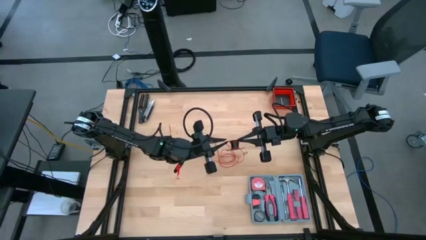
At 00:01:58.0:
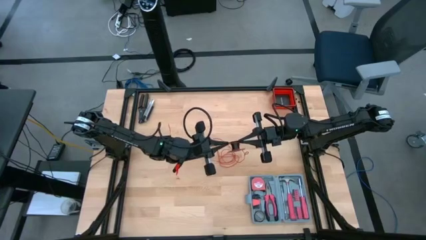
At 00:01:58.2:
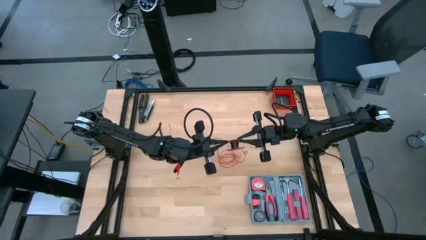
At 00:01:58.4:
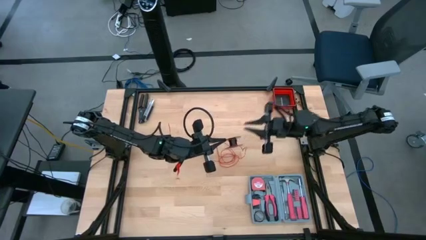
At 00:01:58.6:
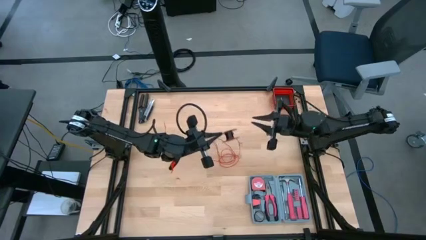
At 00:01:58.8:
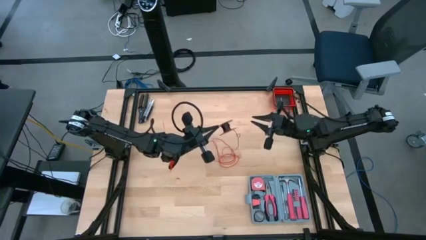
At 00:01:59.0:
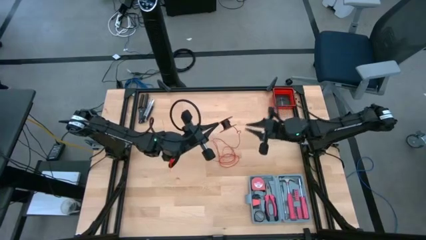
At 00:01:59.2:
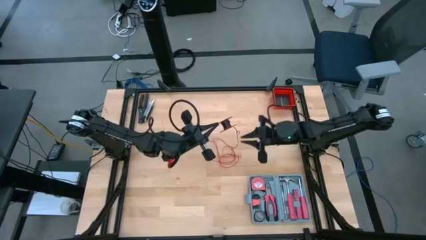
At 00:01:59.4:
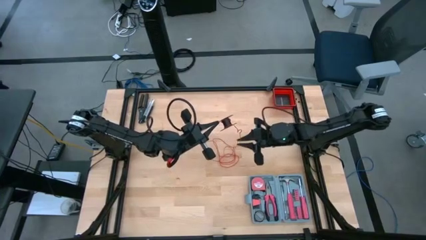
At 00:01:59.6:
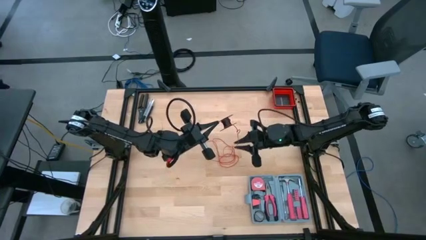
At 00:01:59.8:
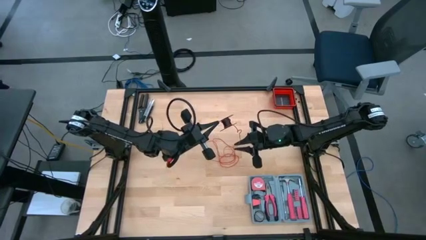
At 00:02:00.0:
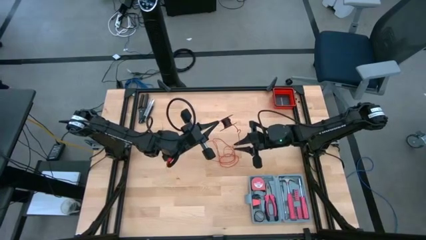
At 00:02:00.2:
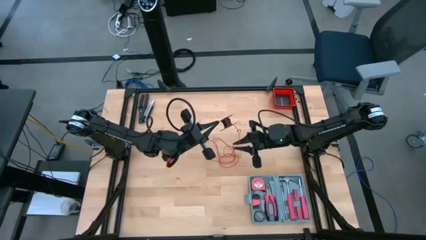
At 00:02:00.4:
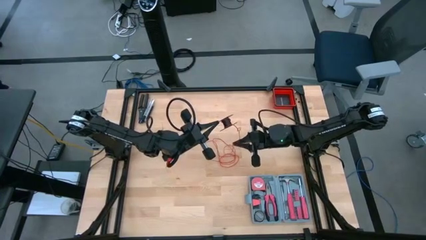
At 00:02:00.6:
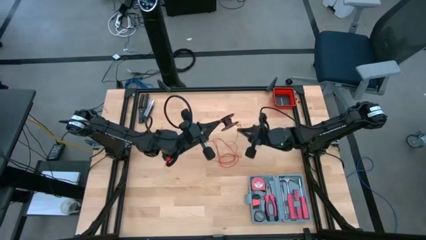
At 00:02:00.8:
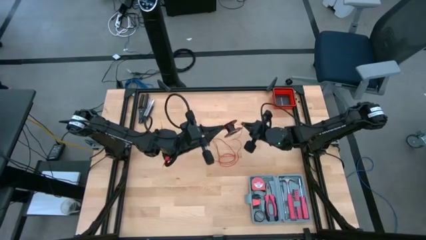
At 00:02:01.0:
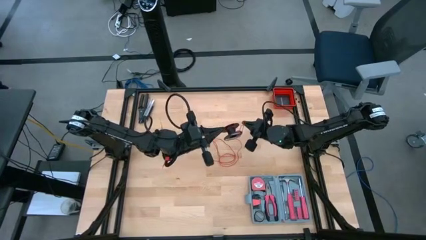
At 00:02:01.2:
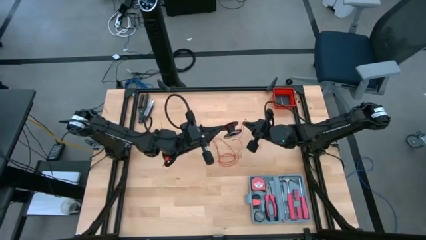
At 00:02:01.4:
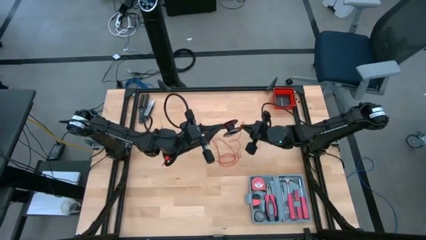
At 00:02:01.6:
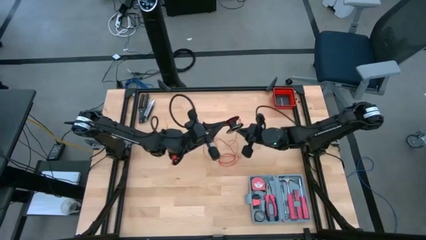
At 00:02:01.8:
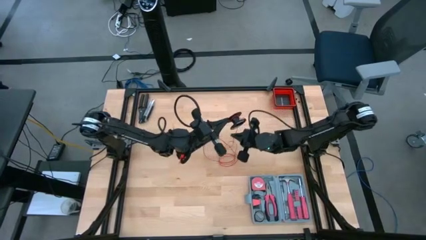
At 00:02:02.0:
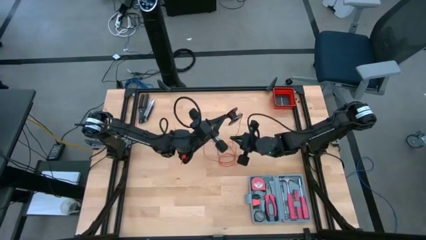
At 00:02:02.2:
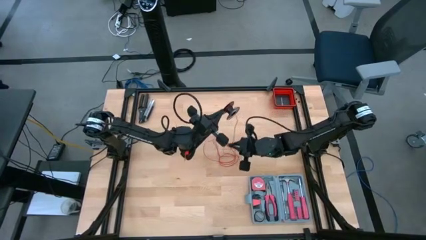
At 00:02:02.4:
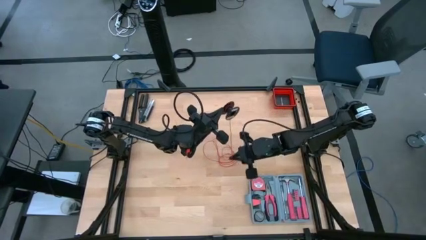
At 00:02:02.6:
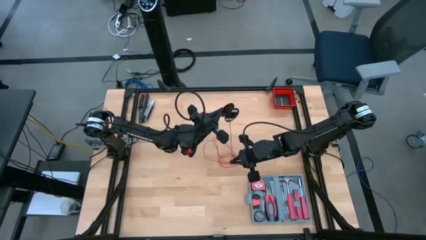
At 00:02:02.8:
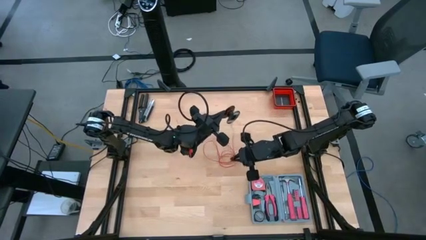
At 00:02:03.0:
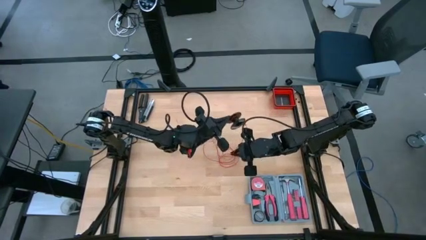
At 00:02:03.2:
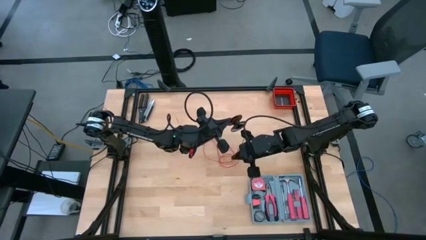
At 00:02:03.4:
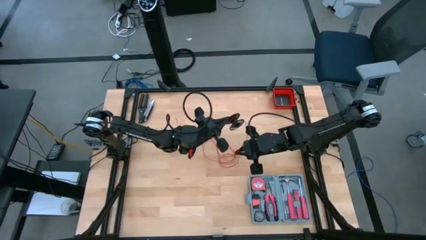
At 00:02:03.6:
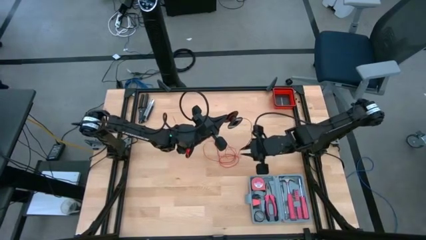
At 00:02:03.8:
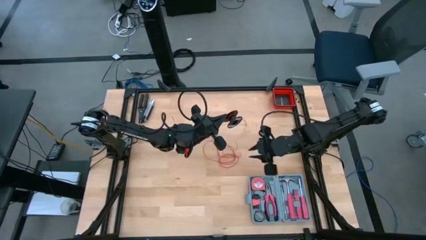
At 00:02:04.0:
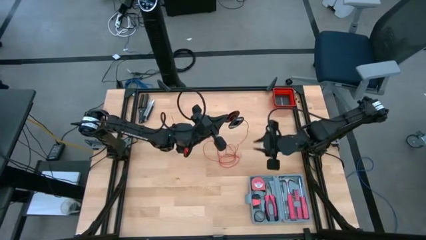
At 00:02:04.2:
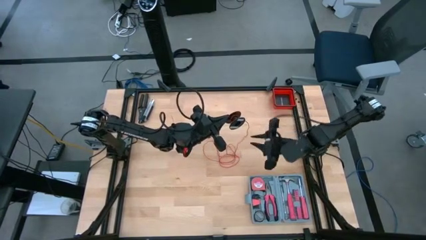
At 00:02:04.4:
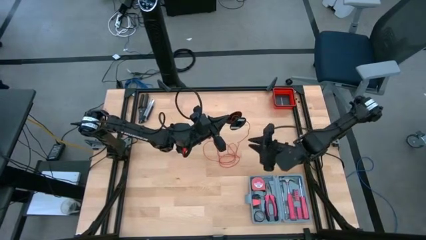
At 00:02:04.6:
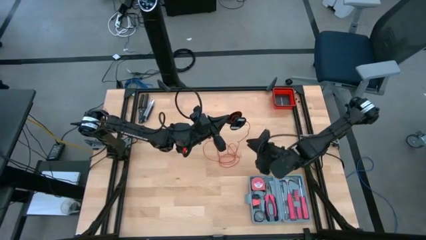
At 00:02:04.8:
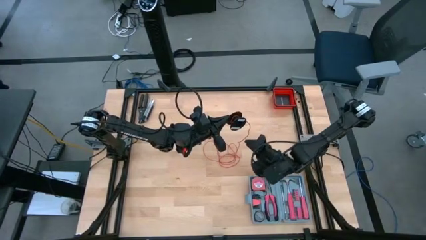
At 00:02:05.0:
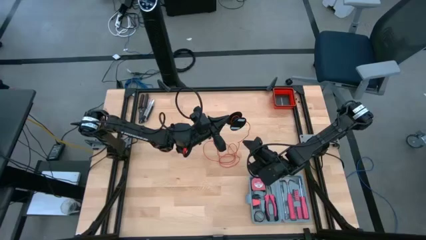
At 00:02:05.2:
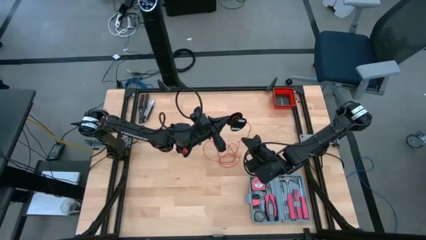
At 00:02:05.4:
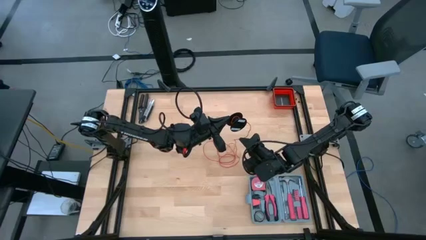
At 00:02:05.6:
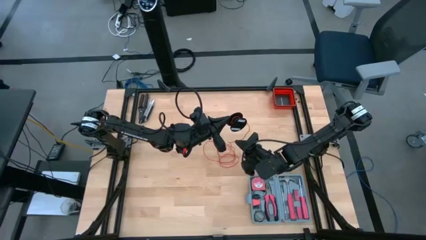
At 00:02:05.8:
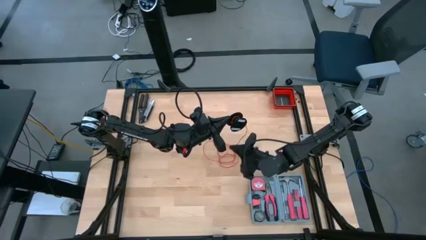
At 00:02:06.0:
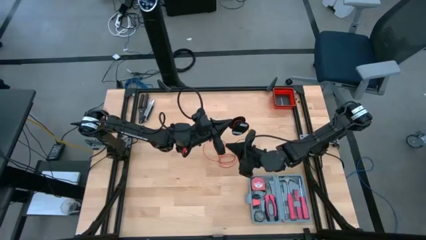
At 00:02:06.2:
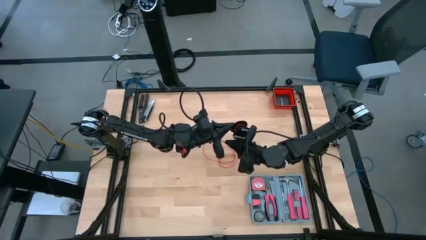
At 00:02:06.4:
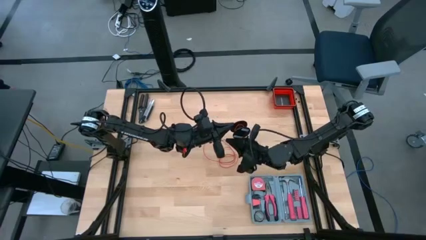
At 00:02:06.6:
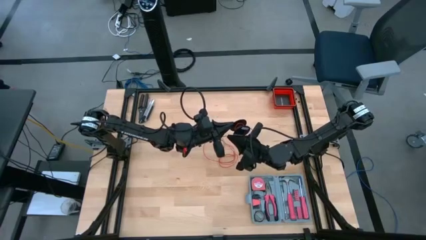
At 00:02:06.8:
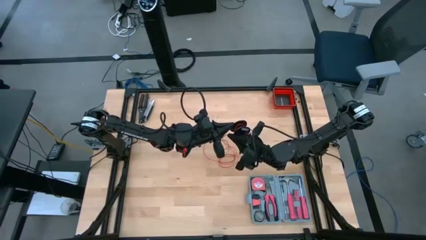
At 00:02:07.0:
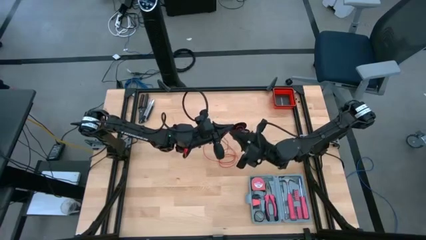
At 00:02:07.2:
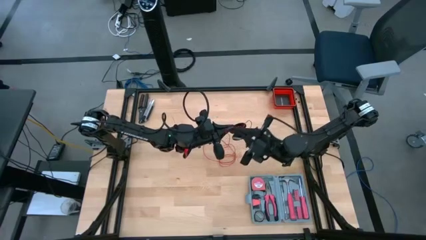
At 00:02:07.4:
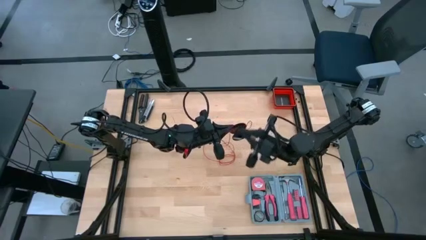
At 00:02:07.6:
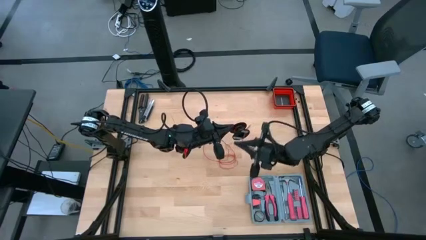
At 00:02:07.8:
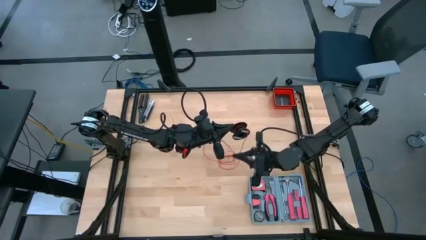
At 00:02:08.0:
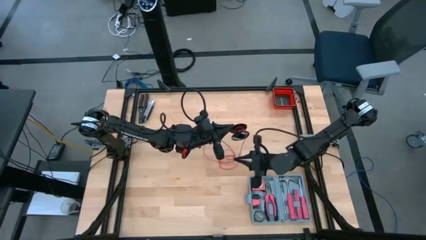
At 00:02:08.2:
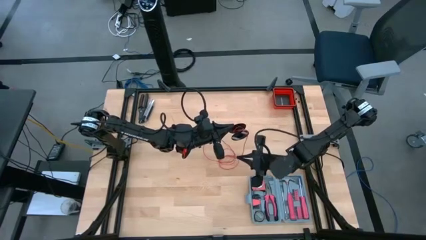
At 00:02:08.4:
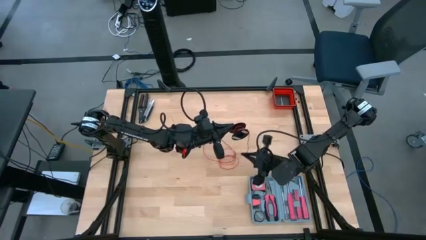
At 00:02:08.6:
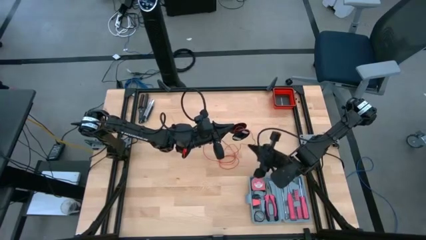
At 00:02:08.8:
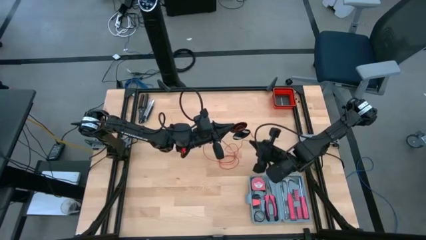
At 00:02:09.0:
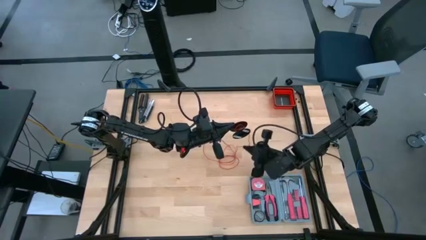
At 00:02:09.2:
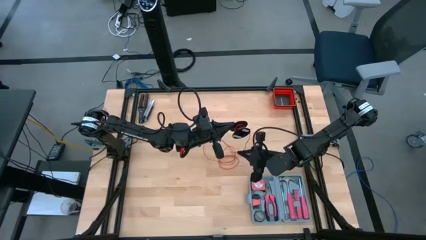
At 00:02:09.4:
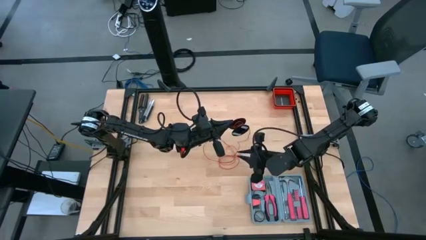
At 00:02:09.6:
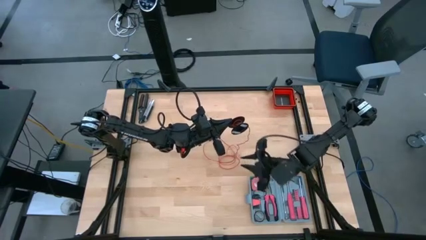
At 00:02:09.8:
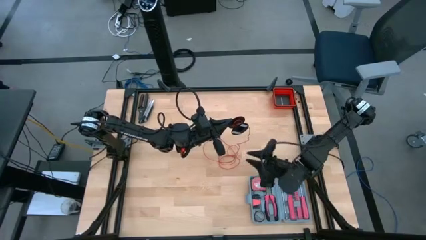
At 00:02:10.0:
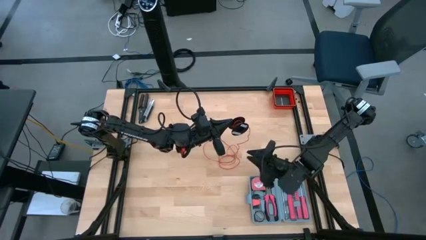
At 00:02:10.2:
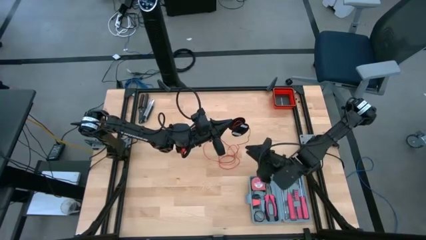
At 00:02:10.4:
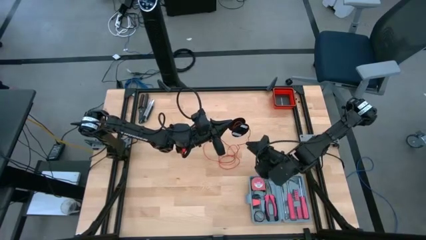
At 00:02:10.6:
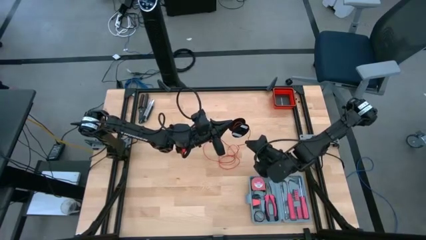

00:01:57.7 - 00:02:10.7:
Task: Coil cords
Coil the wire
